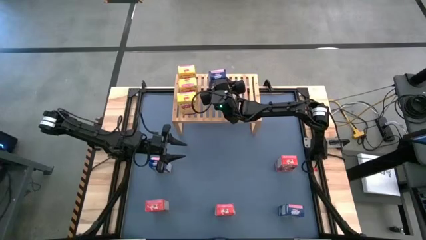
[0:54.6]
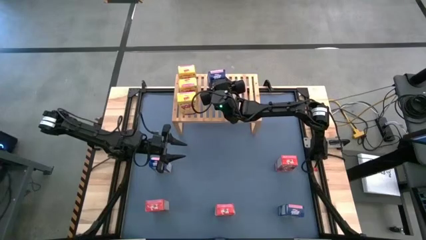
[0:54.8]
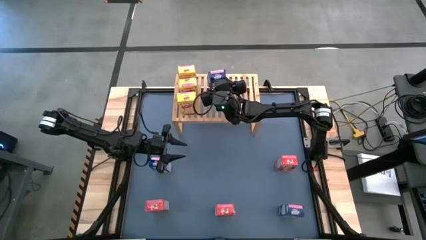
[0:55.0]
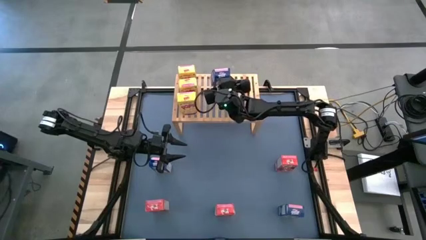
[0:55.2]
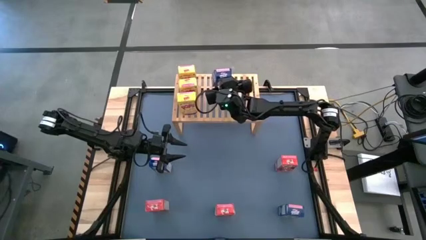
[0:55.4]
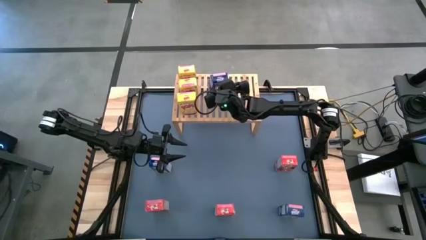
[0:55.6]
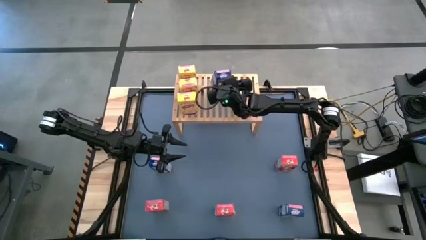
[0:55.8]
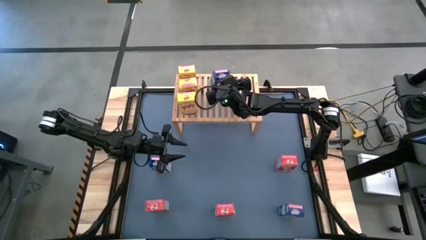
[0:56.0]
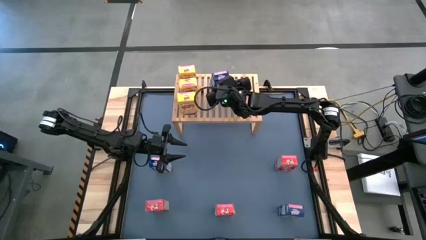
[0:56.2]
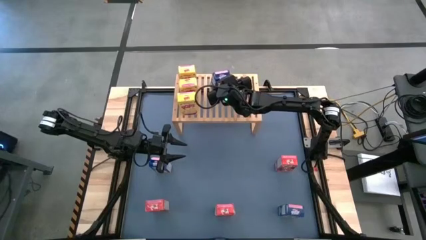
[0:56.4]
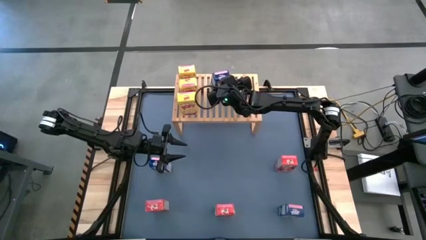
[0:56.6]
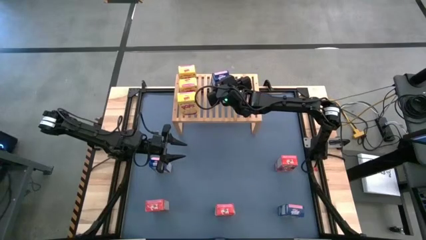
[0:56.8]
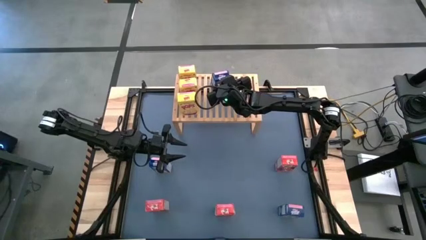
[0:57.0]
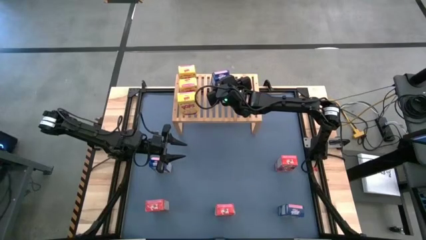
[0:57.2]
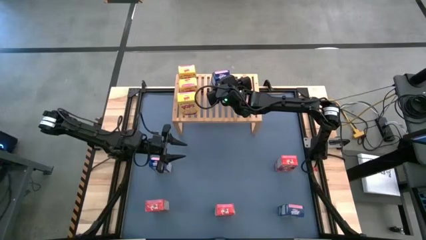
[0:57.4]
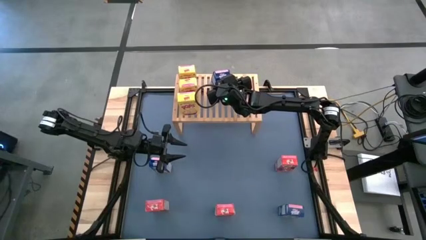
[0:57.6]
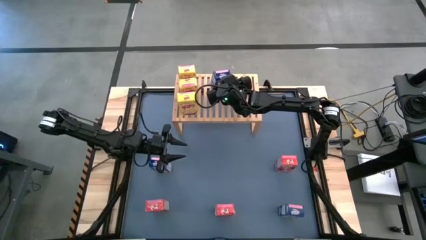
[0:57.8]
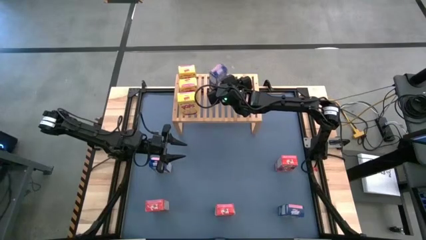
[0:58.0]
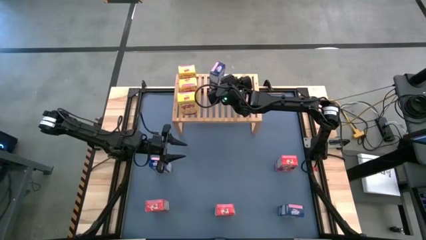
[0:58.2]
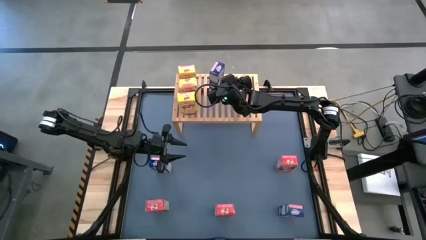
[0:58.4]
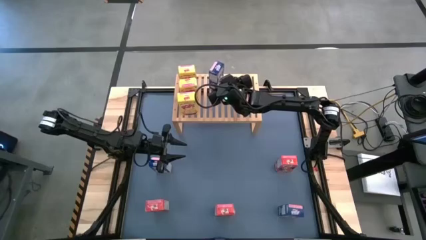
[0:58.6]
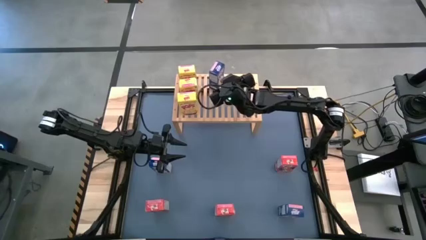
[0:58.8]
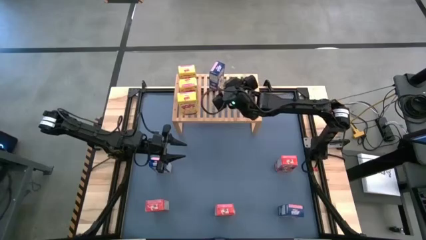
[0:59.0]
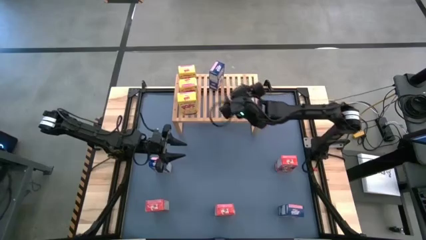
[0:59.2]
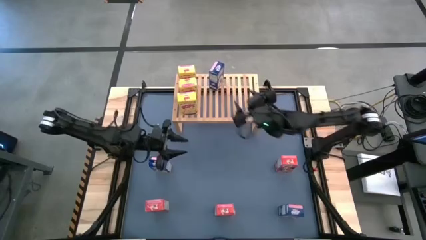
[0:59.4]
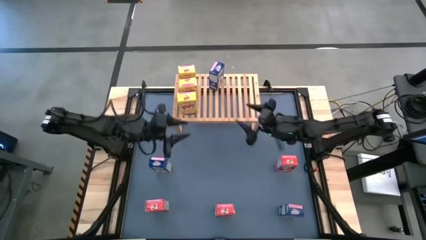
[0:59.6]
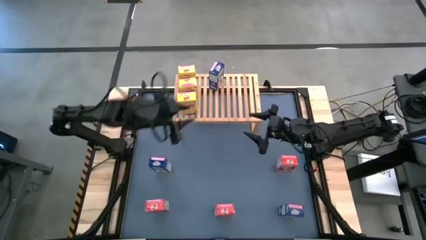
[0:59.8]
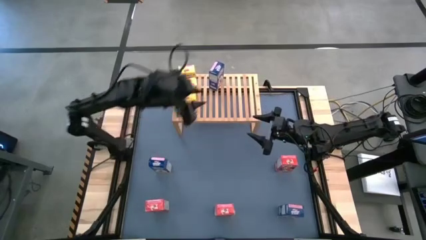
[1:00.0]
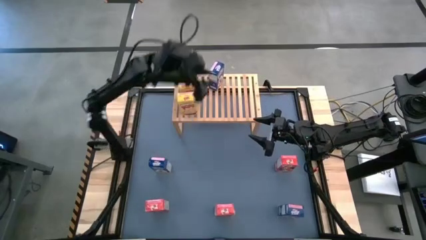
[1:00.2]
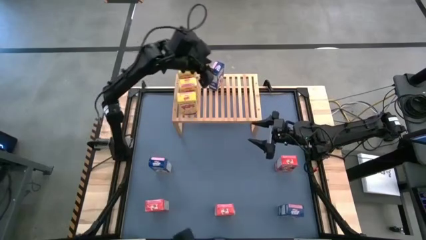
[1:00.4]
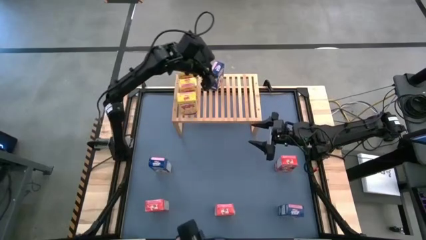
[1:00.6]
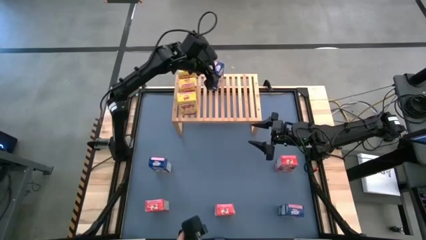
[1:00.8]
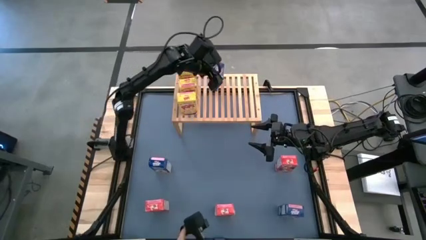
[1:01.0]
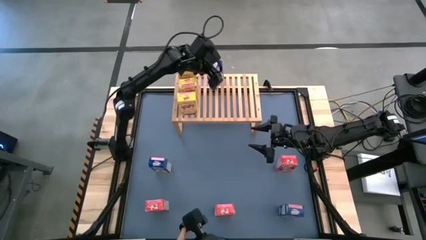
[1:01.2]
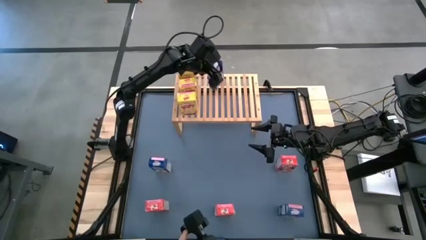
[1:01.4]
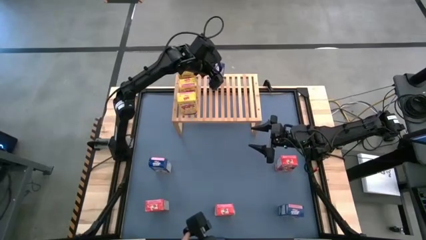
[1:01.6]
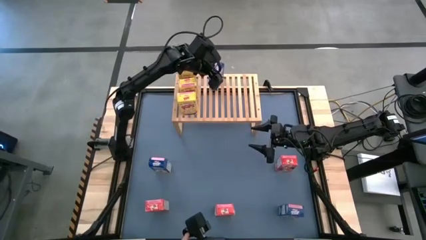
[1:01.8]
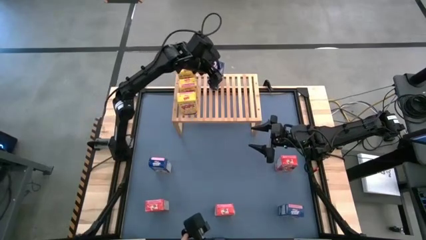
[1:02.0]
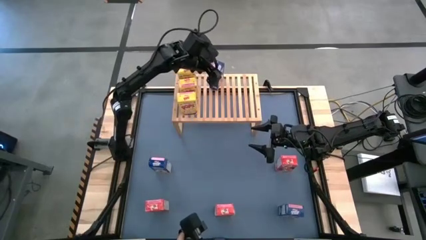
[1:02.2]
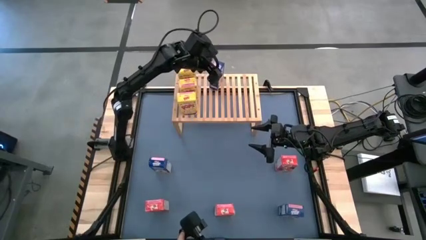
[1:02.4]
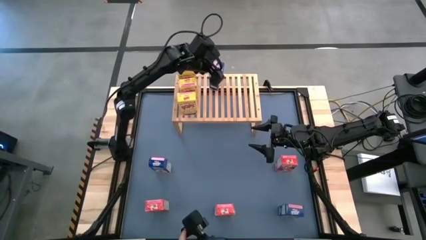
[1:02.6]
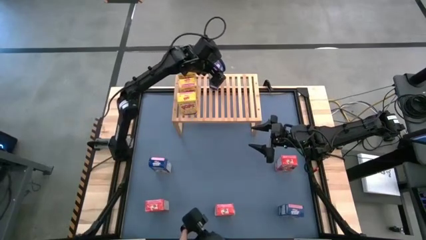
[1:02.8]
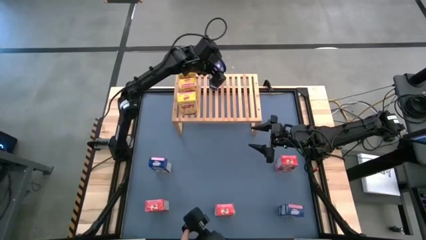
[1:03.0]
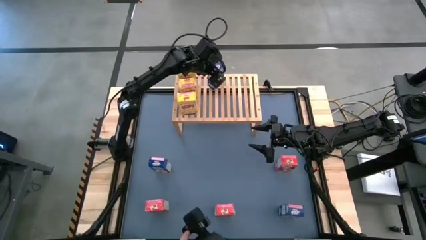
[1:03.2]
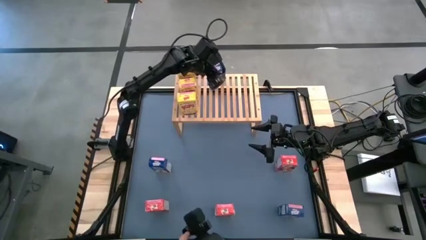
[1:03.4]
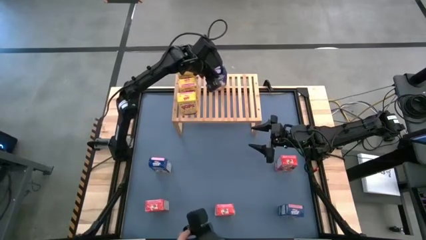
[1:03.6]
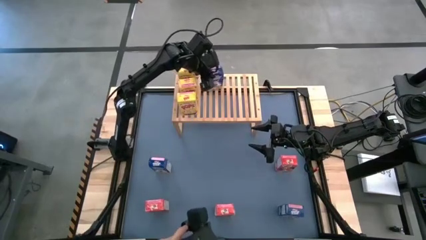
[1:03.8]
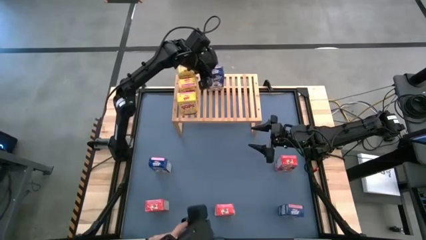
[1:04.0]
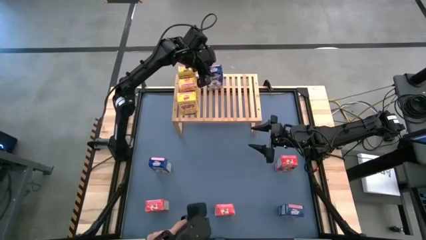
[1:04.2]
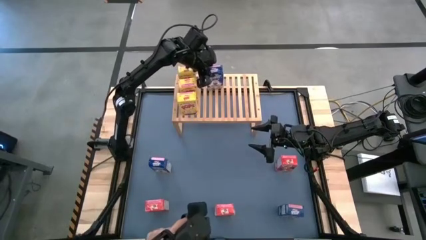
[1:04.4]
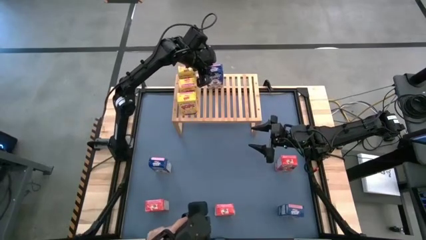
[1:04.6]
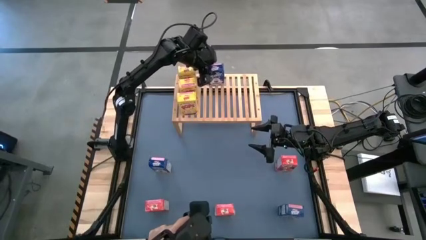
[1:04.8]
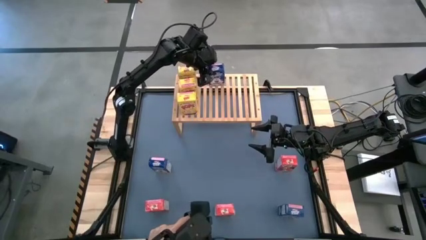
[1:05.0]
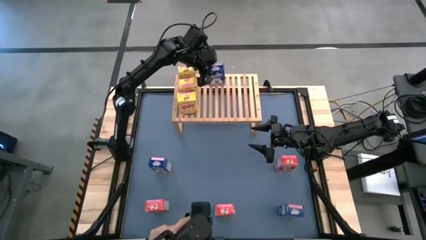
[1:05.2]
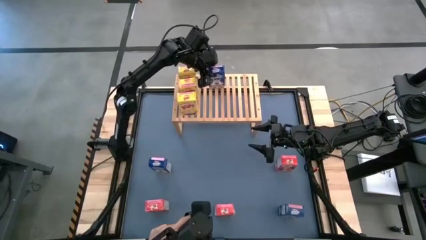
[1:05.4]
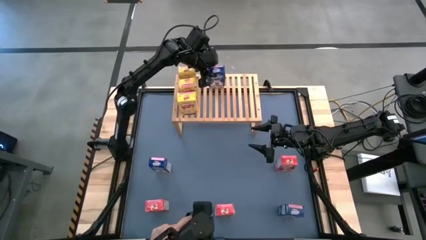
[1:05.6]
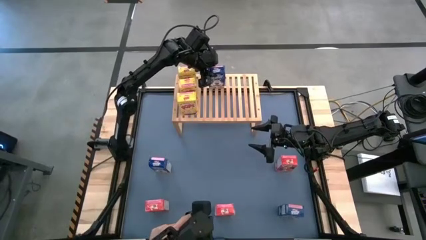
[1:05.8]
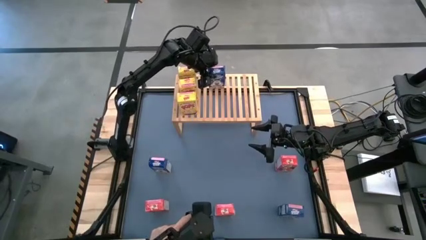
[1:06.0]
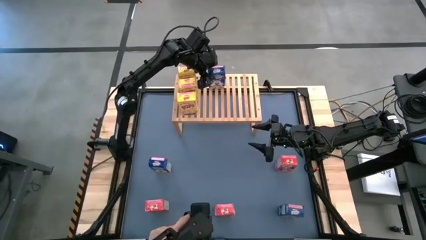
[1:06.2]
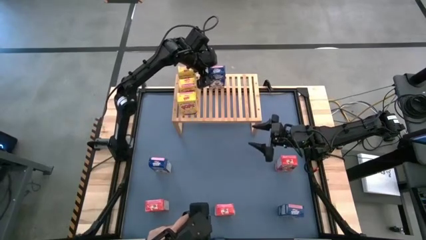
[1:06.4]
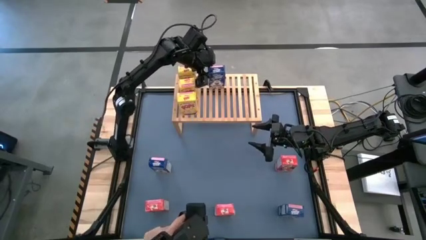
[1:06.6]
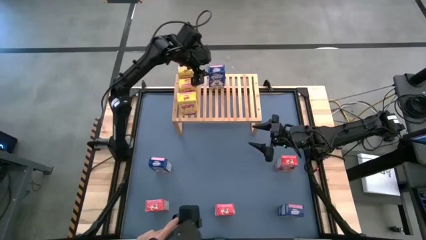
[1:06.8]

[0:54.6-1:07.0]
Task: Stack cereal on shelf
Put the top right blue cereal box on the shelf

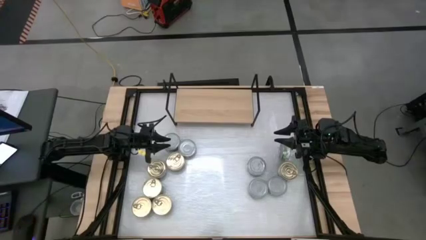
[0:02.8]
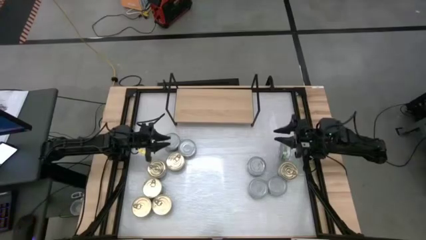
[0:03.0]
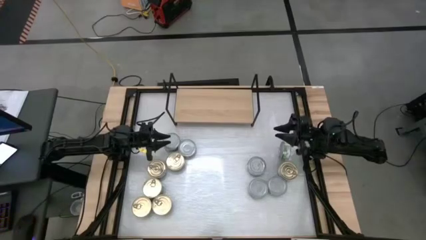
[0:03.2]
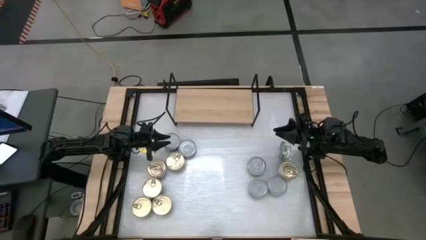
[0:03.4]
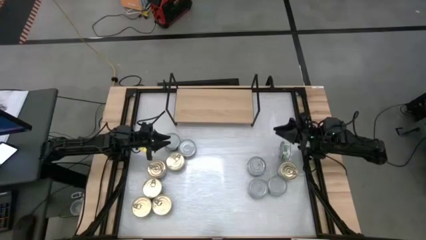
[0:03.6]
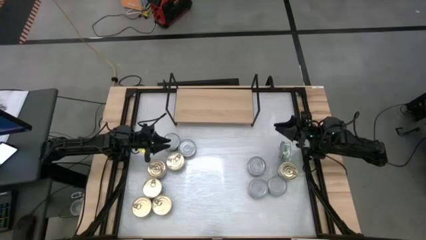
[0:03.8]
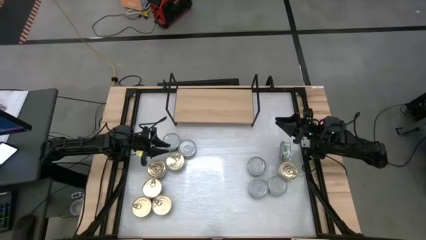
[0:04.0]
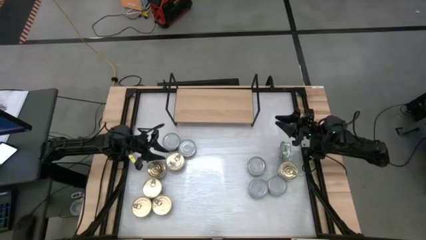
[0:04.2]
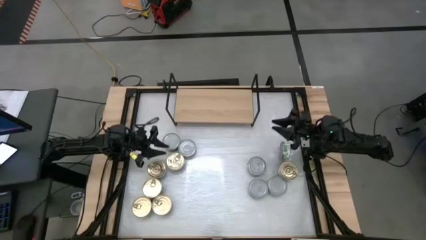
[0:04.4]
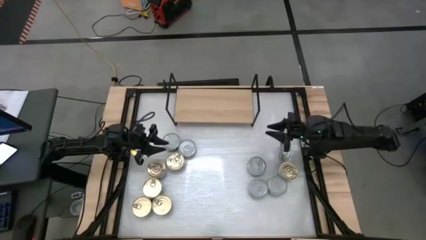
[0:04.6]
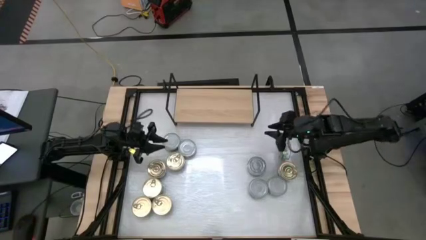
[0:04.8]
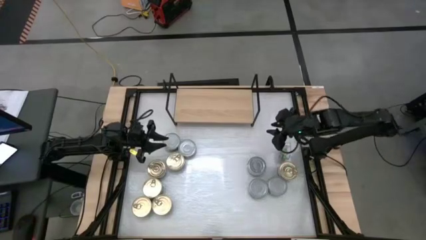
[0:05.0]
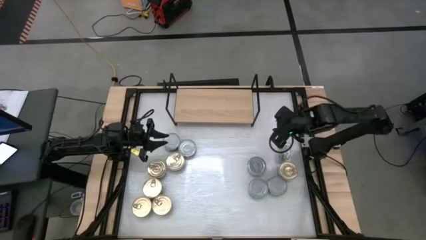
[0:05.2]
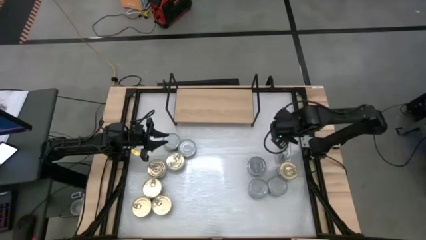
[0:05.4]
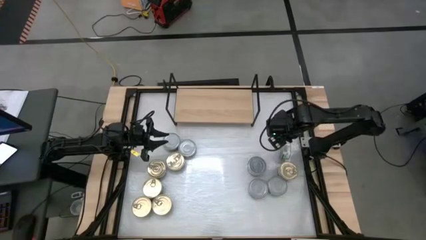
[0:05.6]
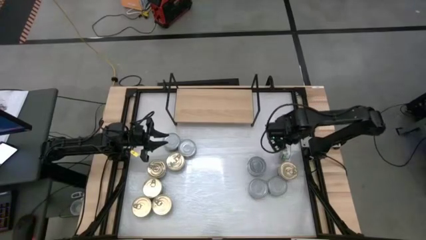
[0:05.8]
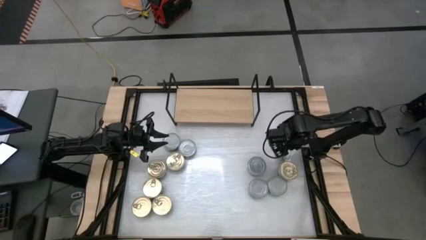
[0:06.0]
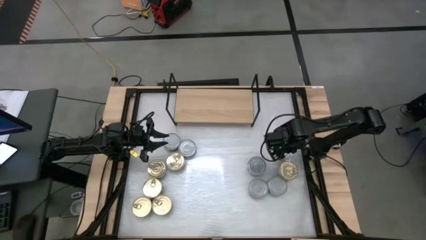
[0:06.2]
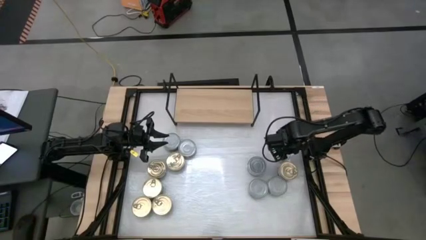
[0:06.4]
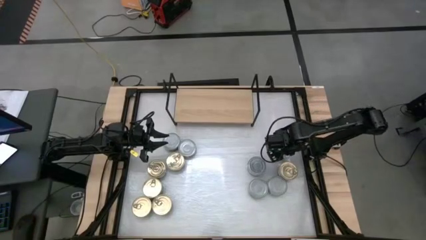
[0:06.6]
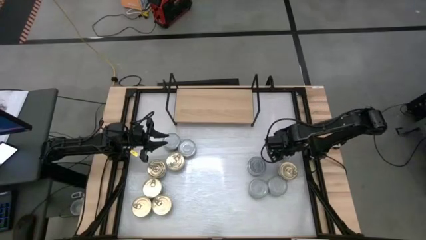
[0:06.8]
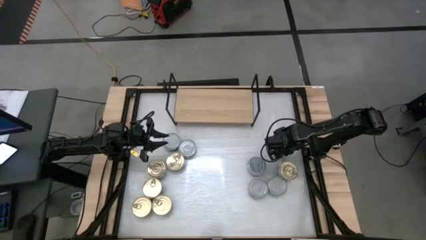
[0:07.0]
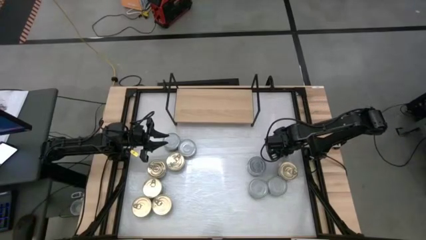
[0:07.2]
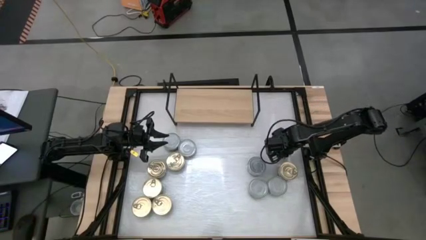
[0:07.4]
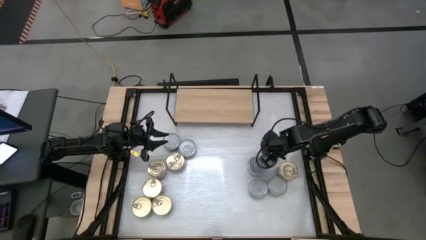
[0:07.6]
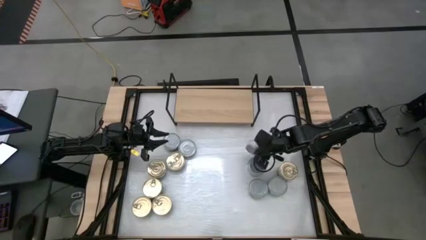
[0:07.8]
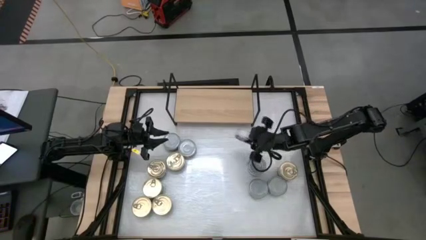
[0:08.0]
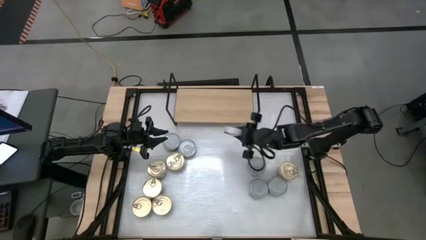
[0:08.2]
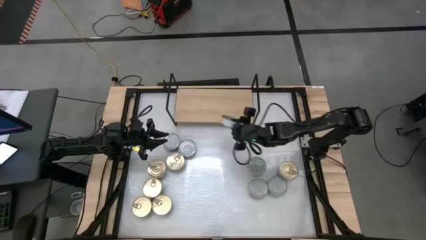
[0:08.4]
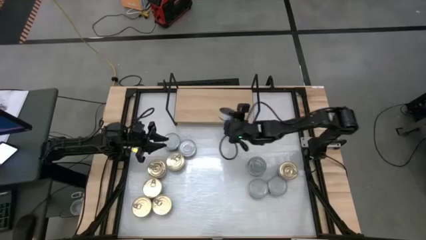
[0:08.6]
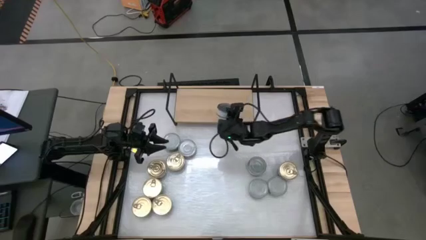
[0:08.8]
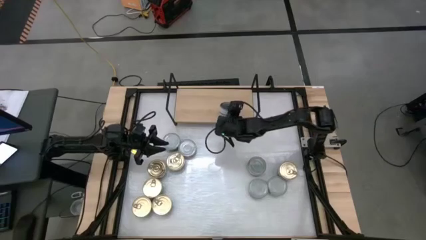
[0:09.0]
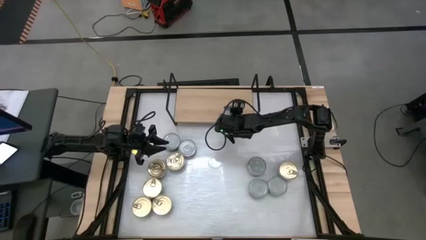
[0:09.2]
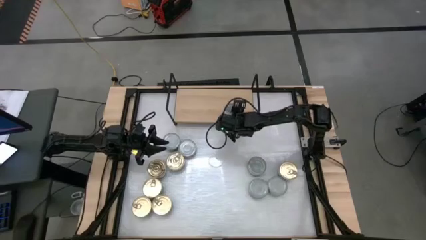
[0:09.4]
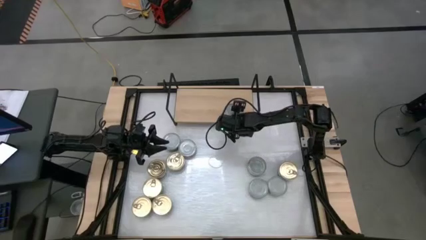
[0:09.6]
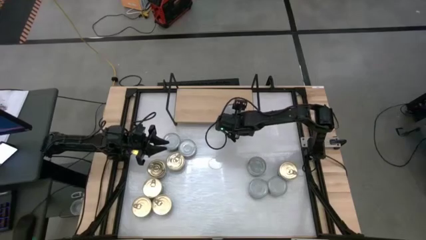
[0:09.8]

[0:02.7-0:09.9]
Task: Stack canned seafood by type on shelf
Put the green tuna can on the shelf
